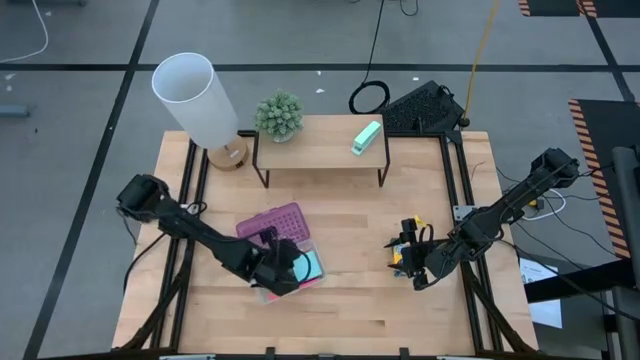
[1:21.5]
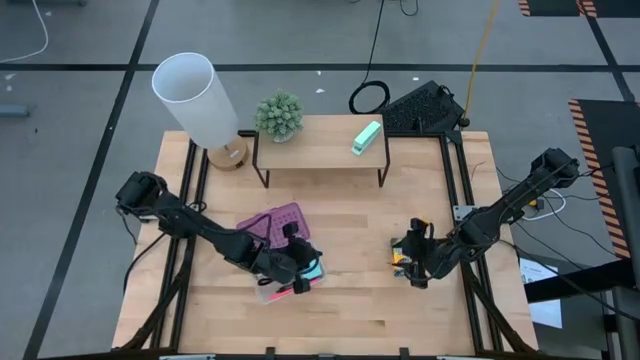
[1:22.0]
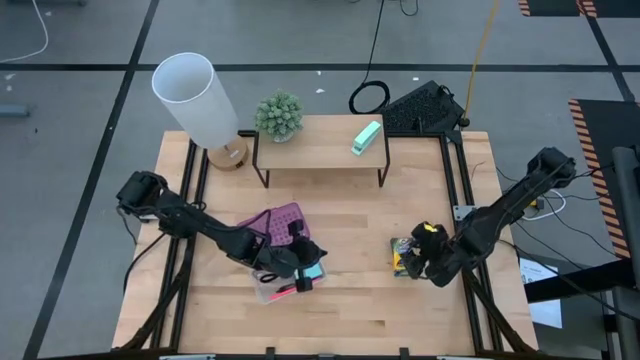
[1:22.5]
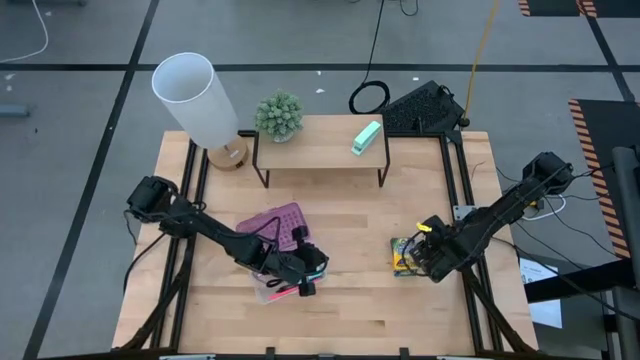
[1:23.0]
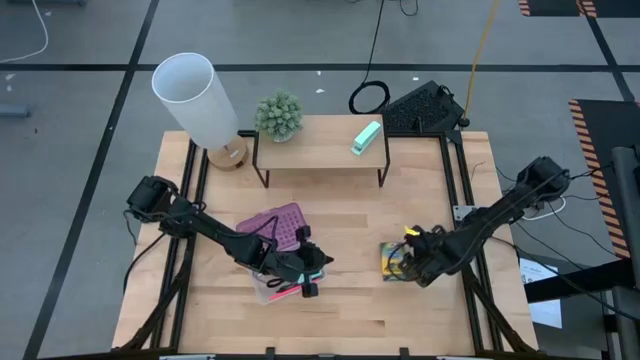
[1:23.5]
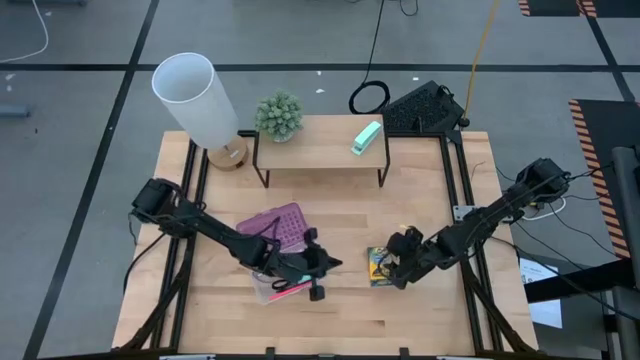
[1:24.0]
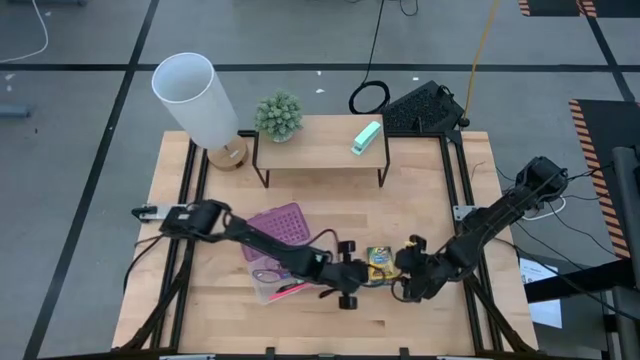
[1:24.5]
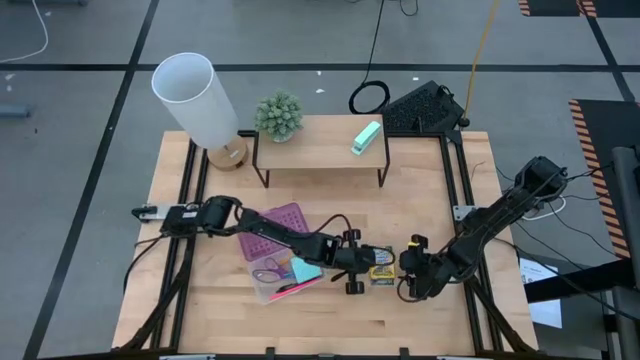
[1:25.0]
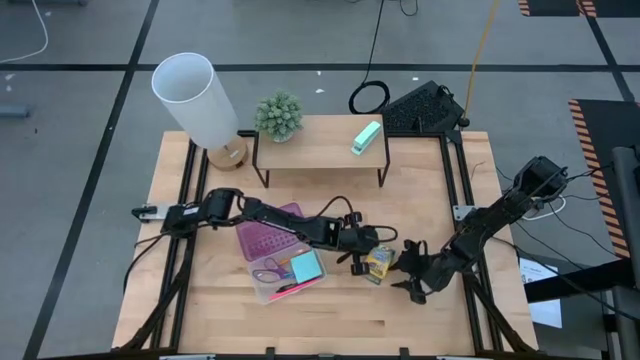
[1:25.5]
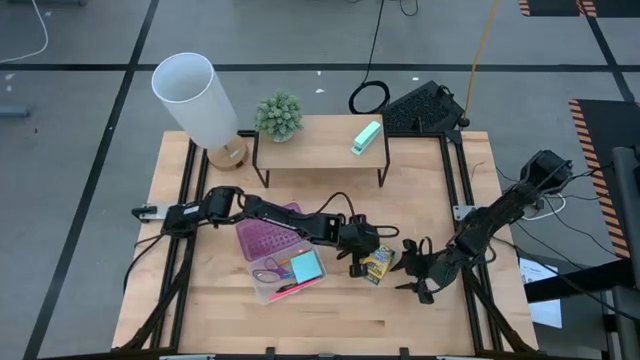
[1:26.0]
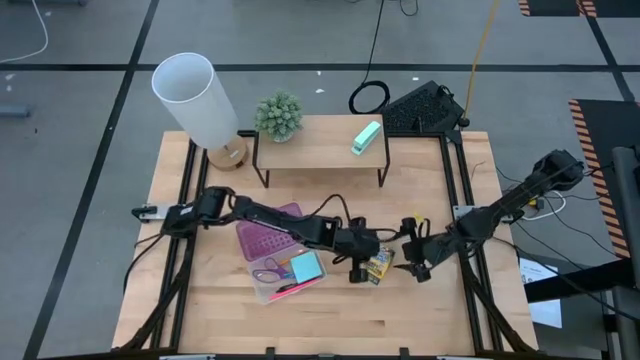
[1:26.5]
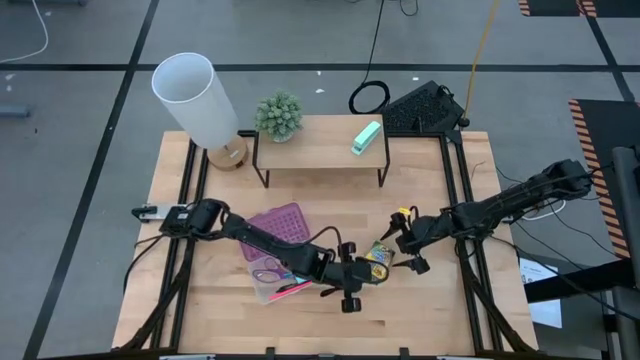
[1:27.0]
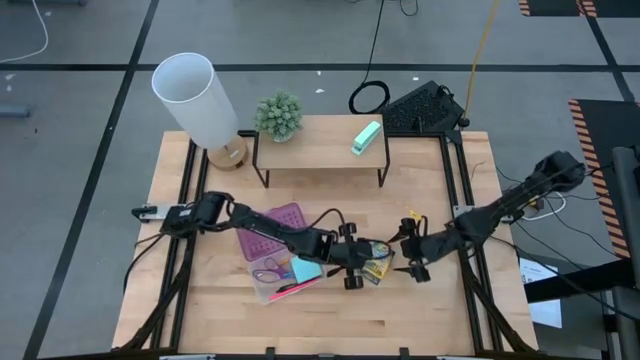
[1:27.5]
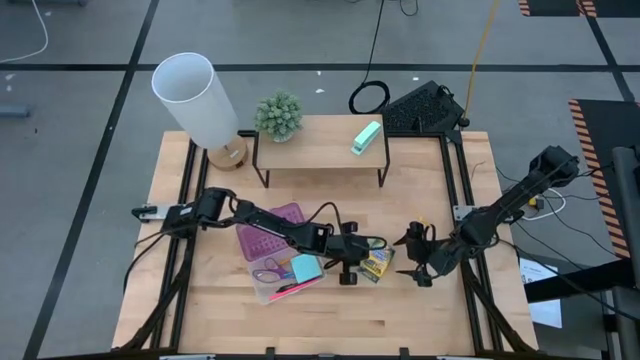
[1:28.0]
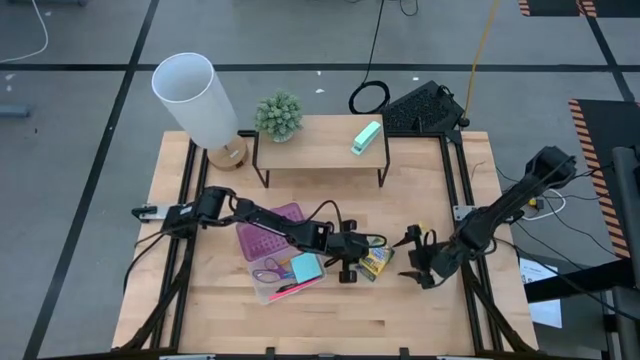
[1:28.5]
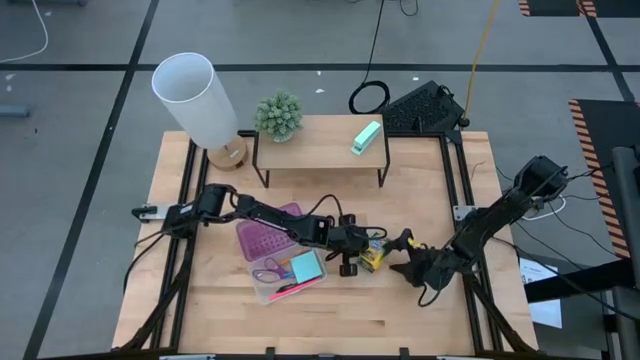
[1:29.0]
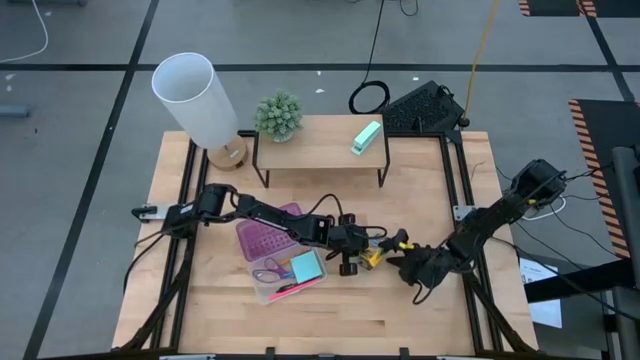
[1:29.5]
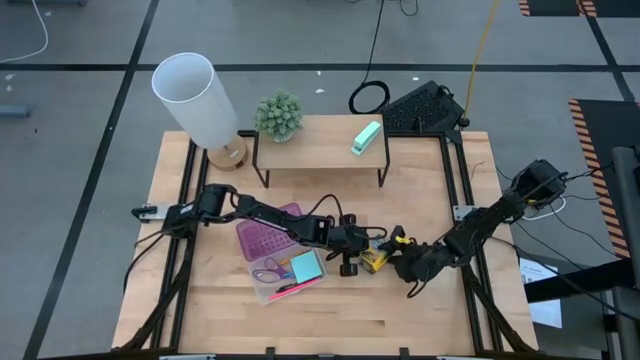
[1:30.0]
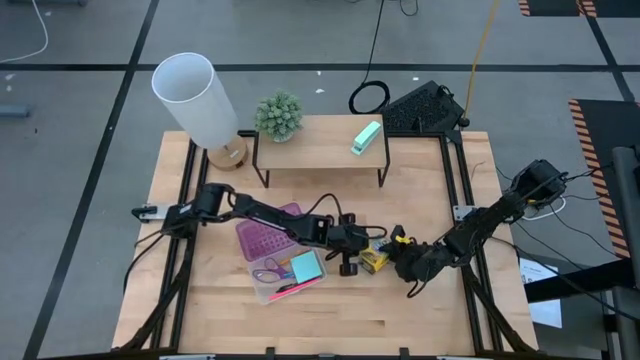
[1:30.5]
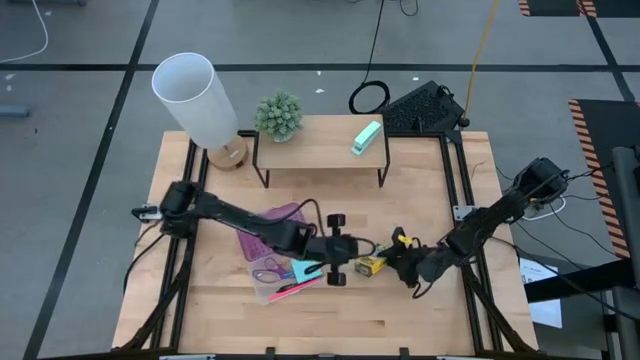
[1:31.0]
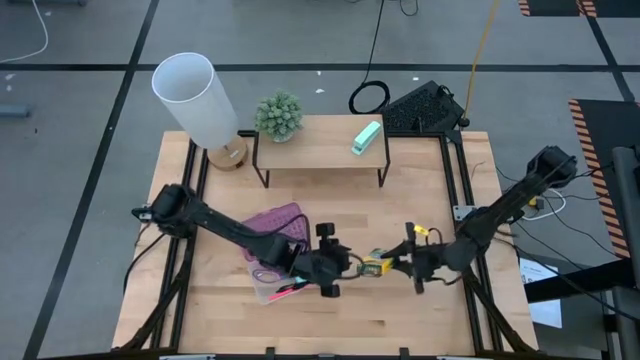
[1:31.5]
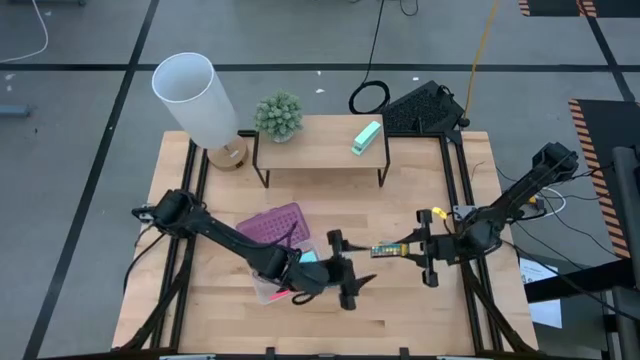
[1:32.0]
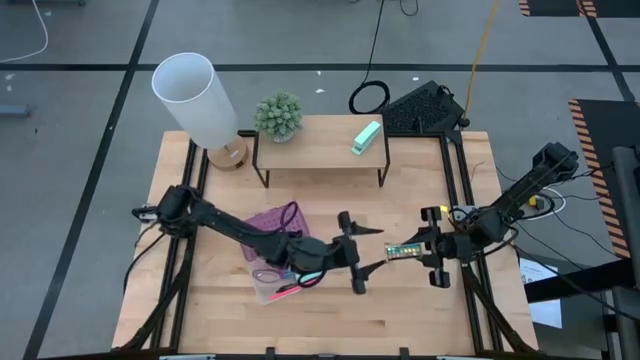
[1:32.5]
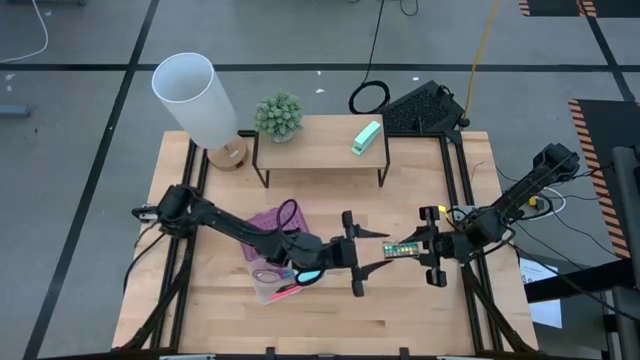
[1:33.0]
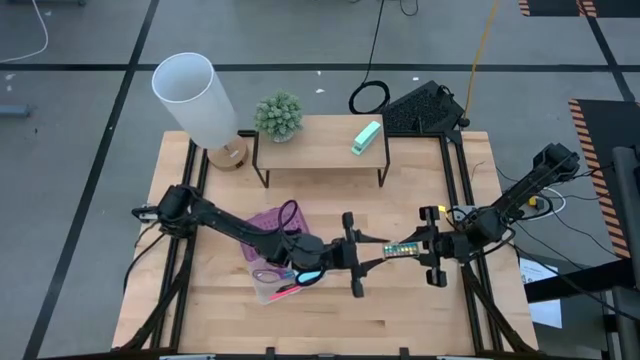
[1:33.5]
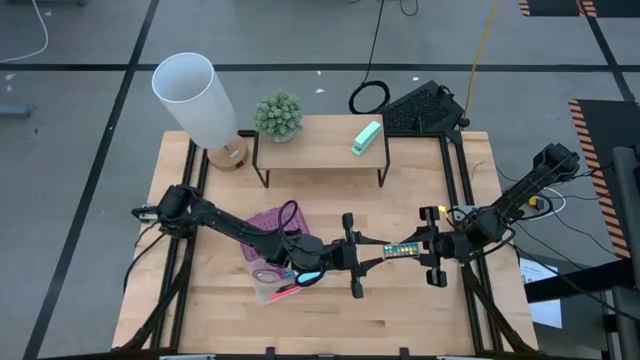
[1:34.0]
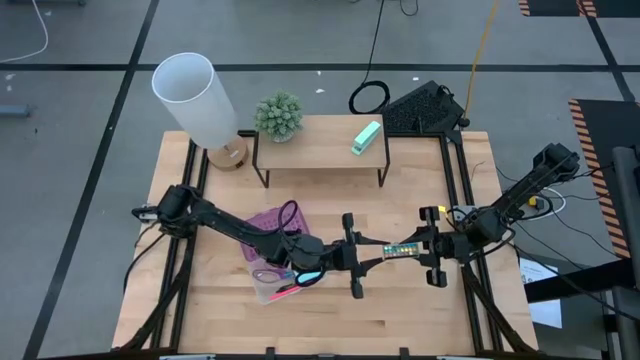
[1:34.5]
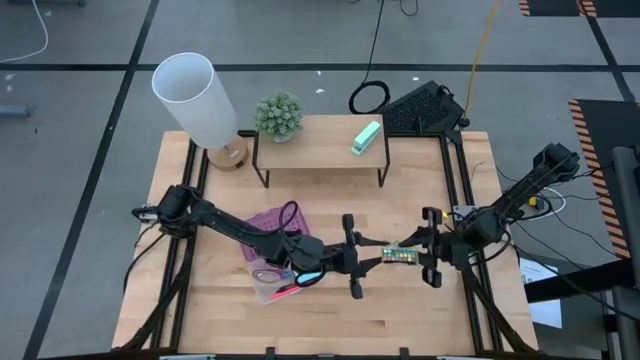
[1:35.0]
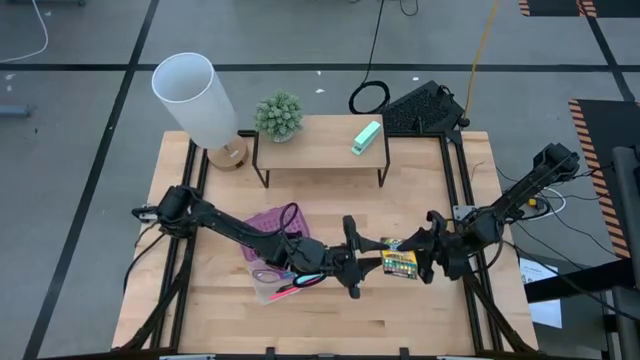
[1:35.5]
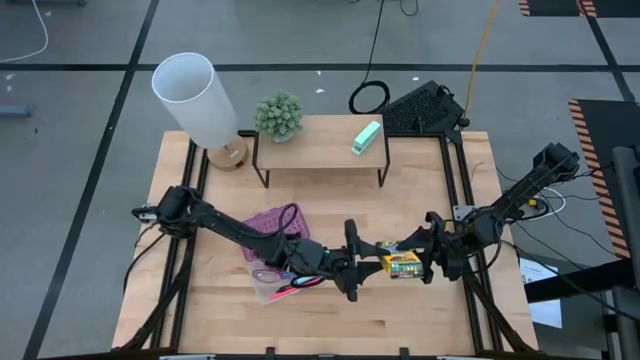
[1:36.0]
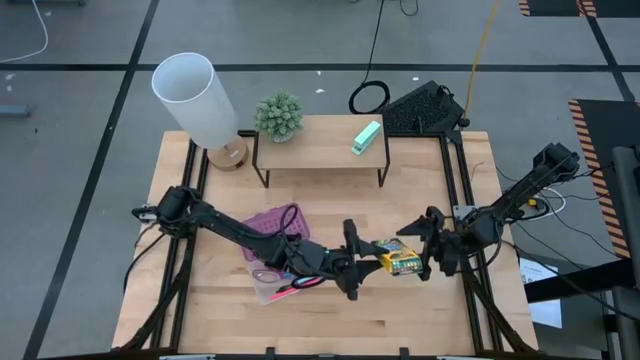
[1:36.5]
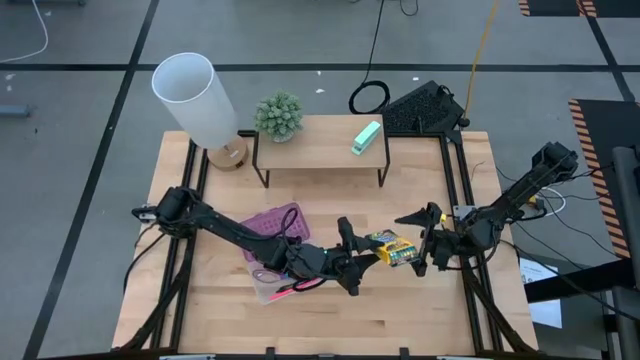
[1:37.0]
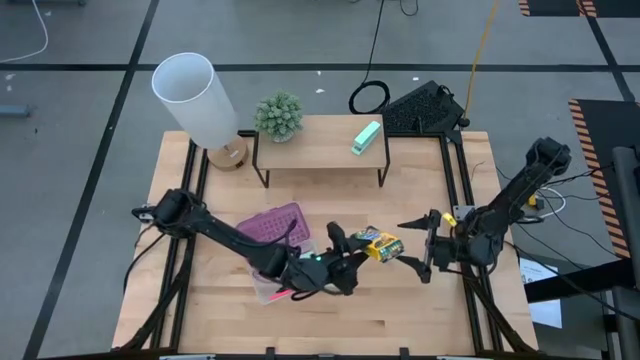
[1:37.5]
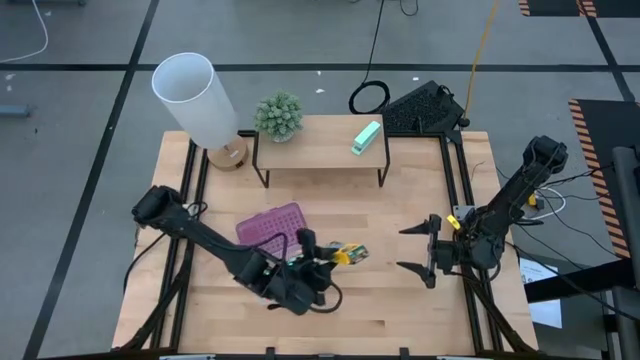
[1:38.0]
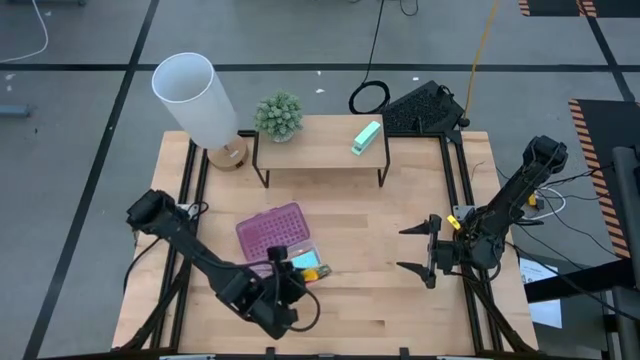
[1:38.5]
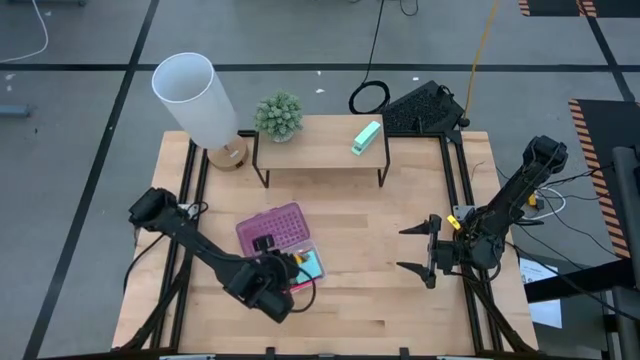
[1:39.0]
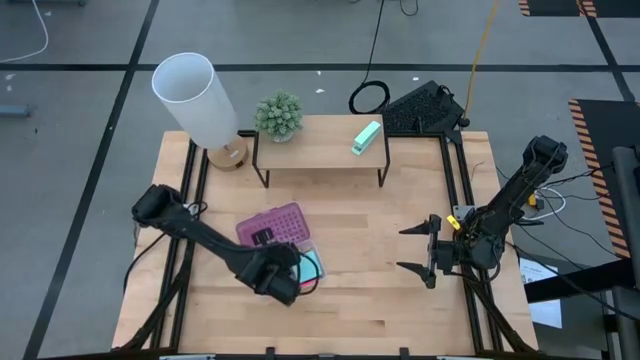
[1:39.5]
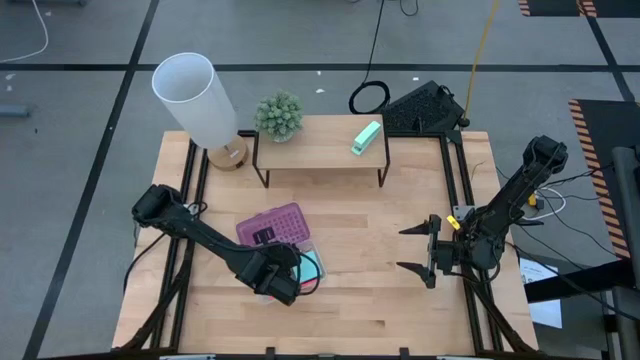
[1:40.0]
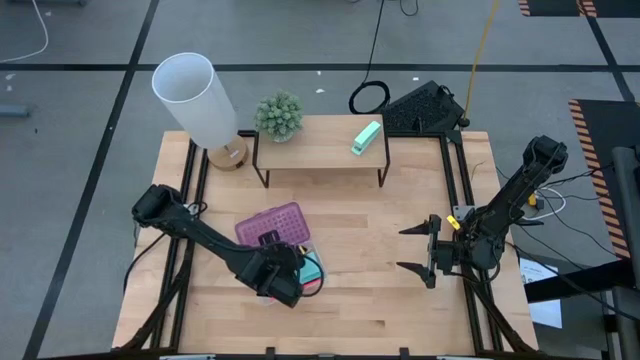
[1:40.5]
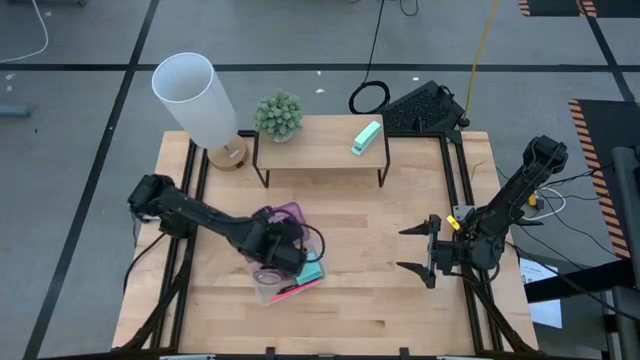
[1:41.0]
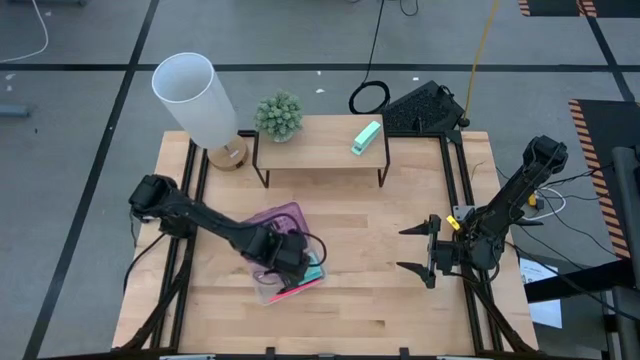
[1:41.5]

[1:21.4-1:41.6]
Task: Pack school essentials
Put the yellow box into the transparent box

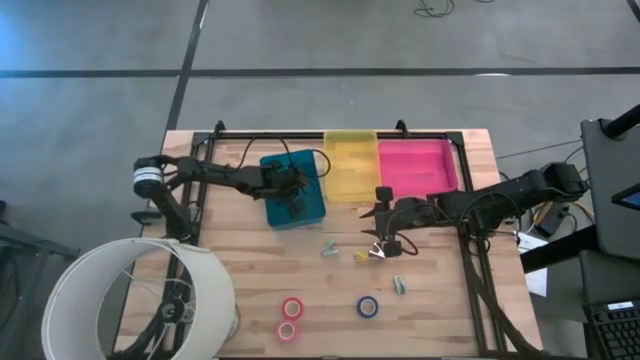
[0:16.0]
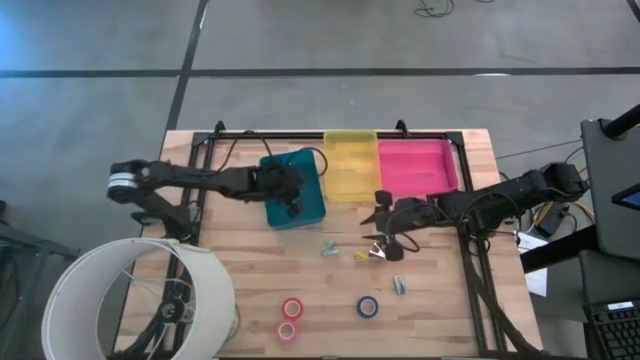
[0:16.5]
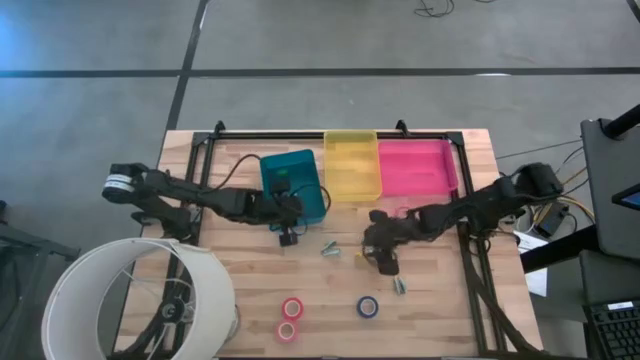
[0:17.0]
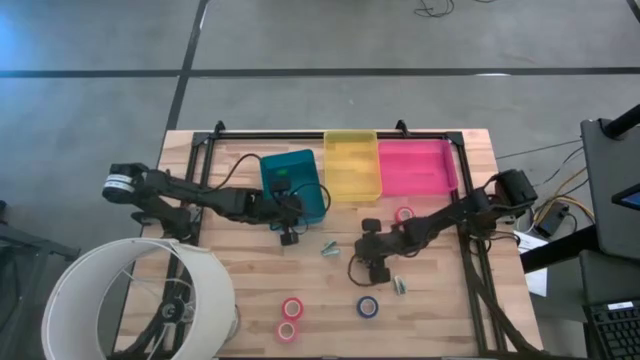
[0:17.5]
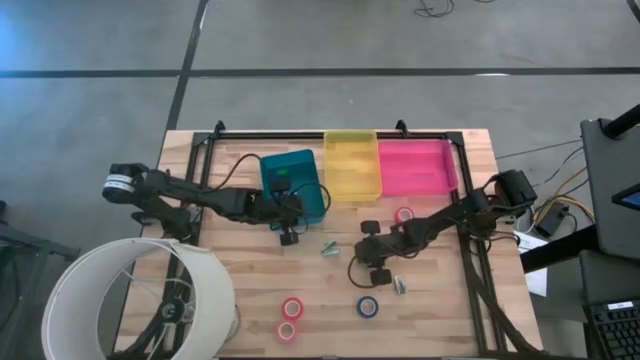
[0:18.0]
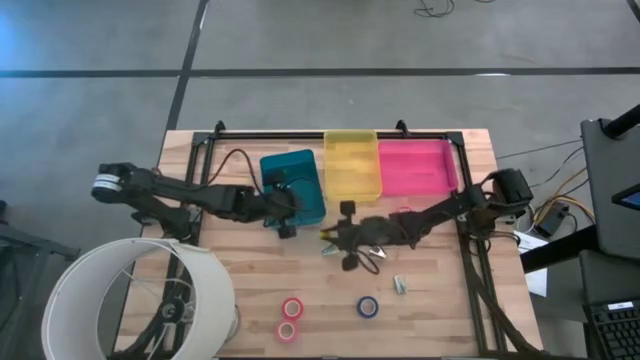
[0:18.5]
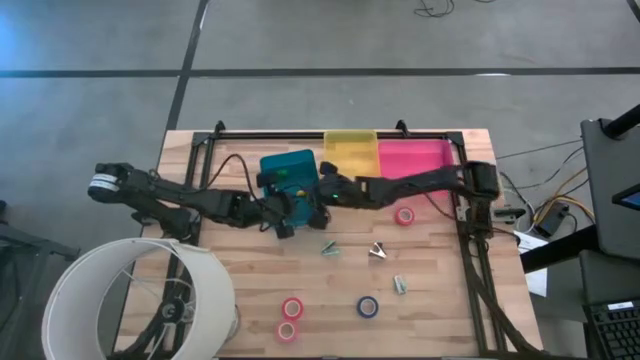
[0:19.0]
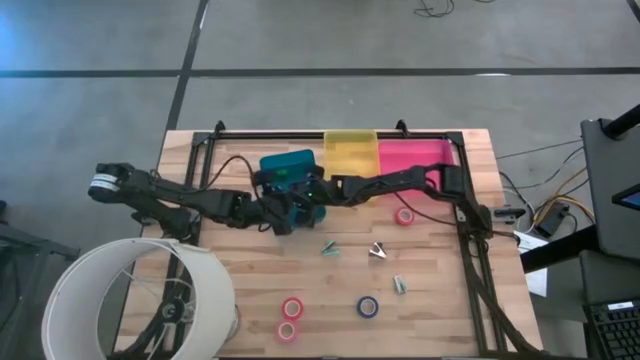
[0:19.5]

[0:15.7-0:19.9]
Task: Pick and place Stapler, Stapler remover, tape
Put the yellow stapler into the blue bin
